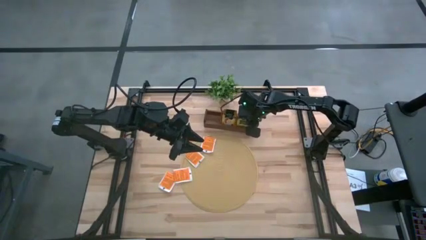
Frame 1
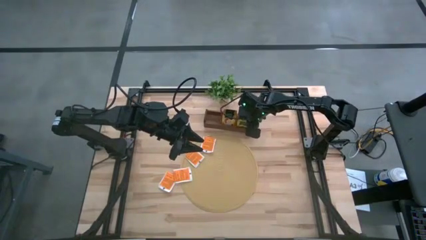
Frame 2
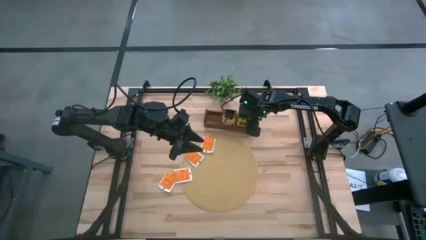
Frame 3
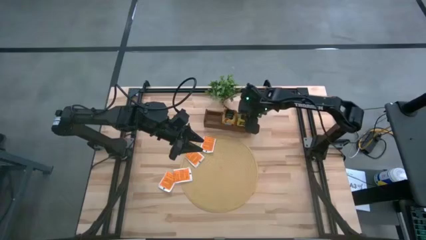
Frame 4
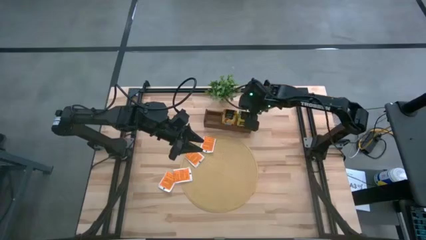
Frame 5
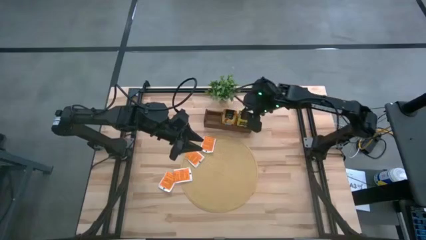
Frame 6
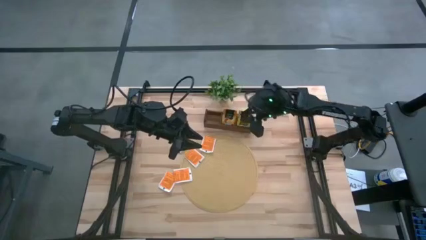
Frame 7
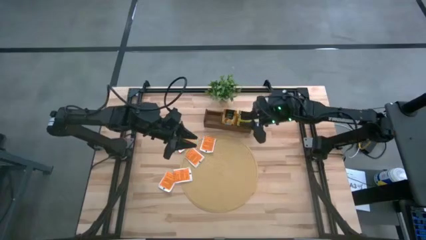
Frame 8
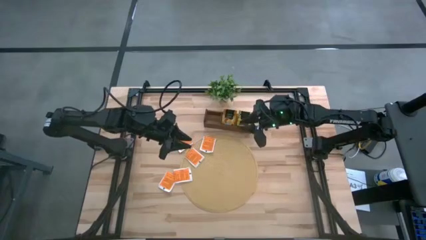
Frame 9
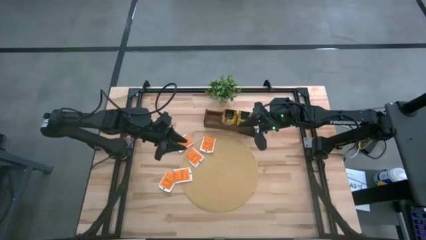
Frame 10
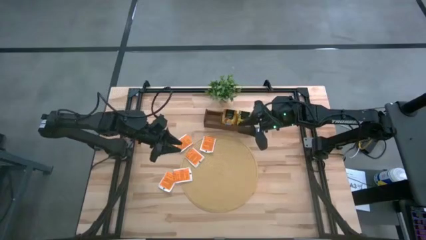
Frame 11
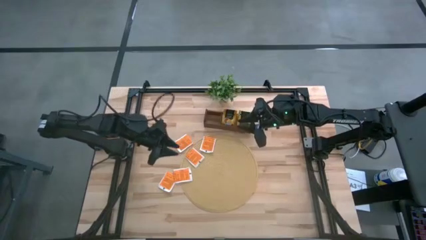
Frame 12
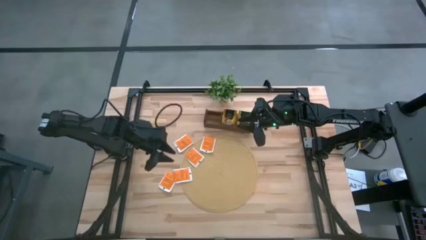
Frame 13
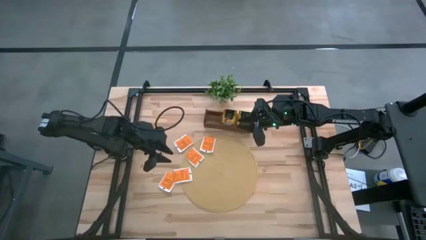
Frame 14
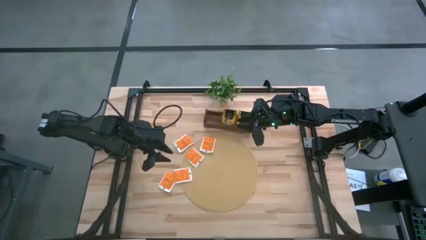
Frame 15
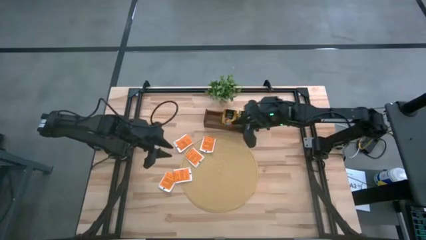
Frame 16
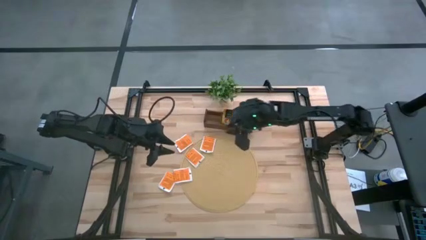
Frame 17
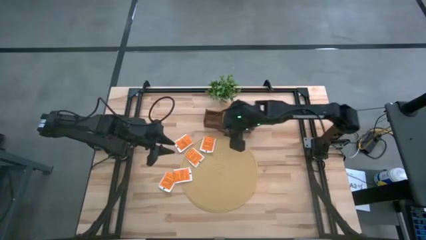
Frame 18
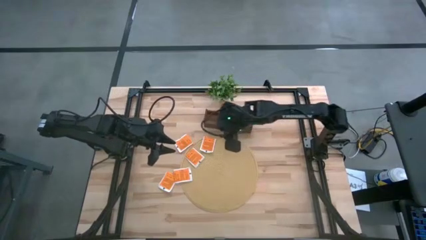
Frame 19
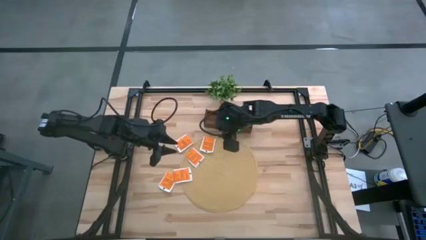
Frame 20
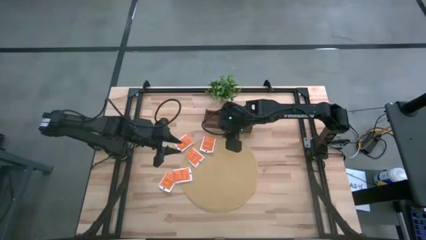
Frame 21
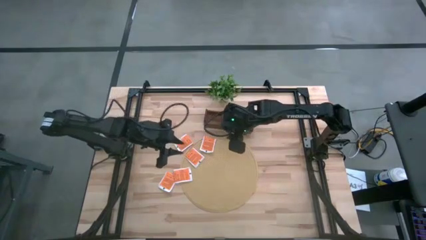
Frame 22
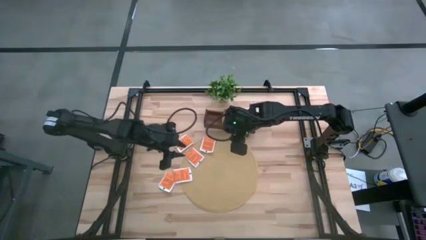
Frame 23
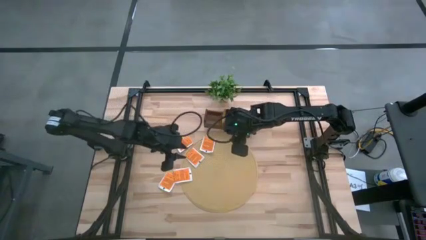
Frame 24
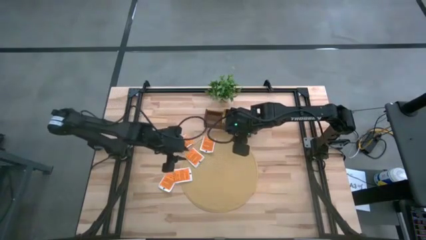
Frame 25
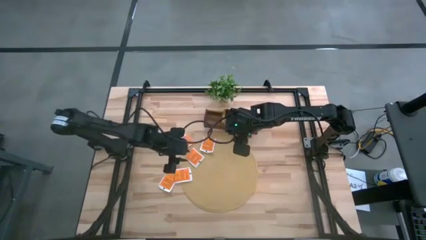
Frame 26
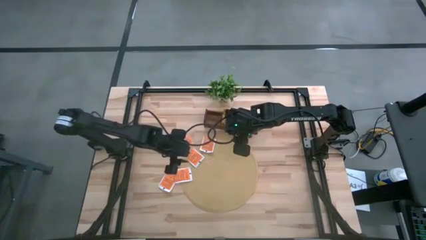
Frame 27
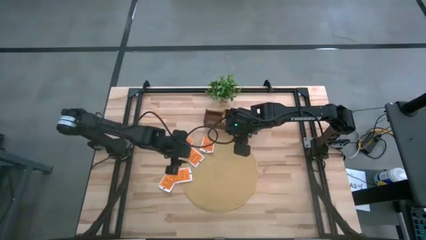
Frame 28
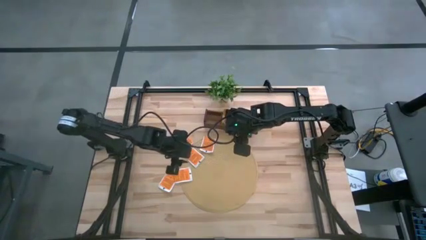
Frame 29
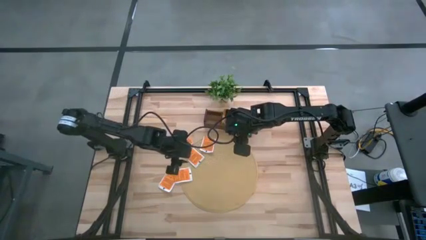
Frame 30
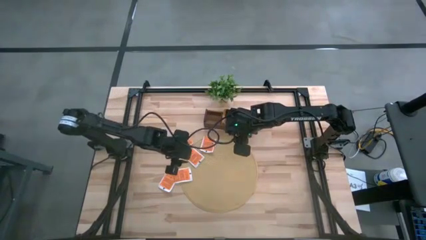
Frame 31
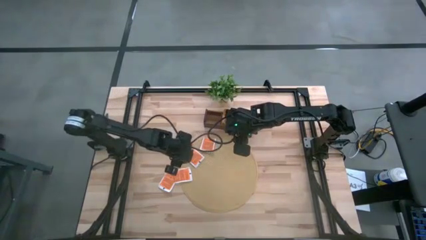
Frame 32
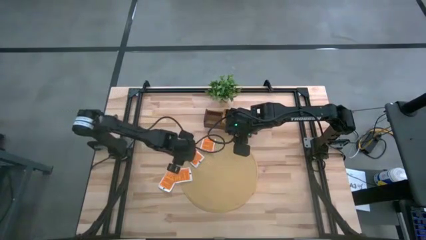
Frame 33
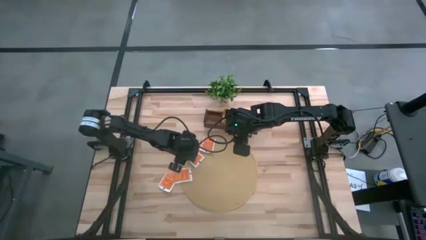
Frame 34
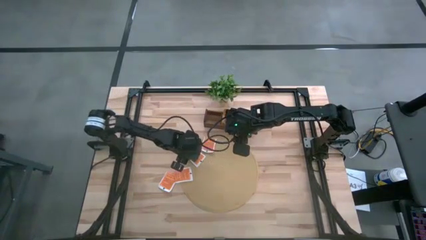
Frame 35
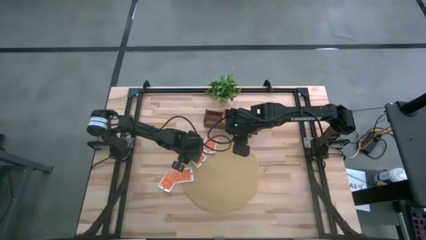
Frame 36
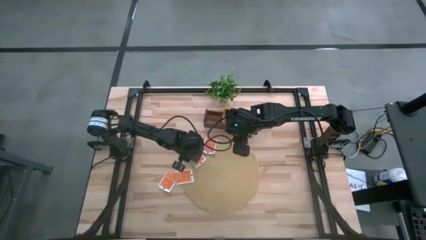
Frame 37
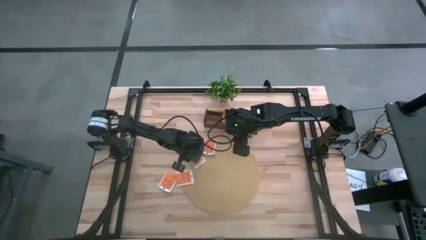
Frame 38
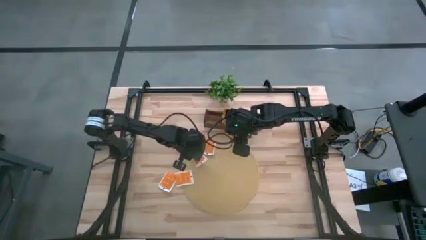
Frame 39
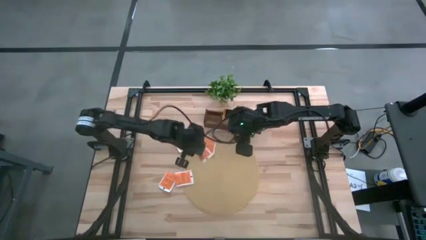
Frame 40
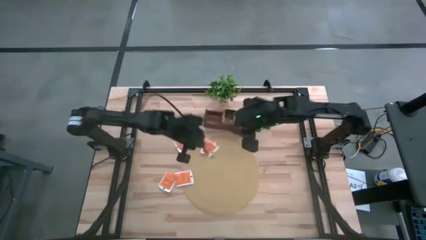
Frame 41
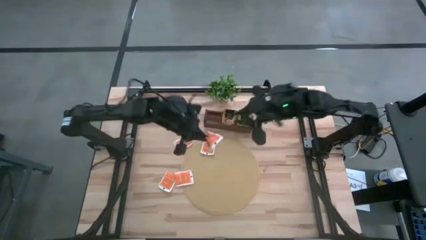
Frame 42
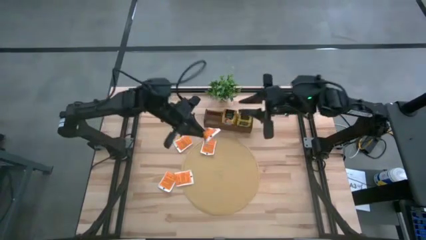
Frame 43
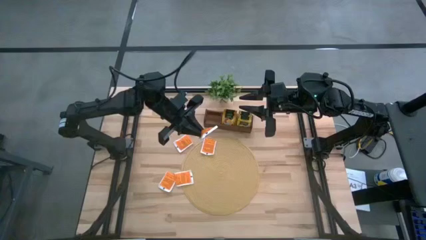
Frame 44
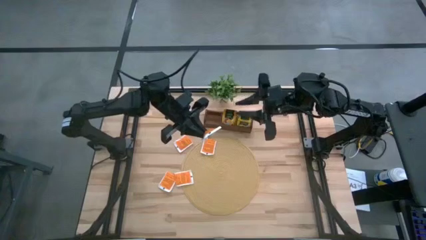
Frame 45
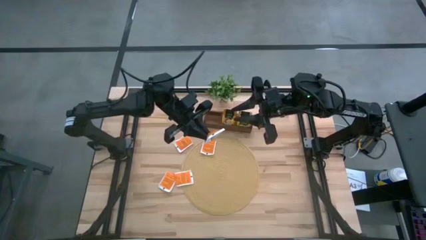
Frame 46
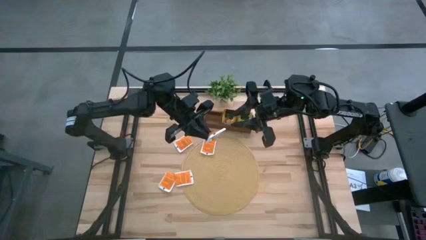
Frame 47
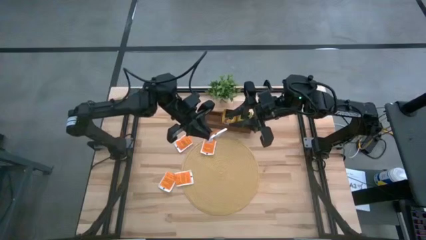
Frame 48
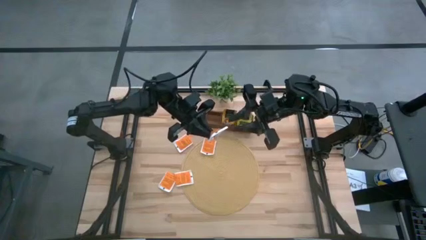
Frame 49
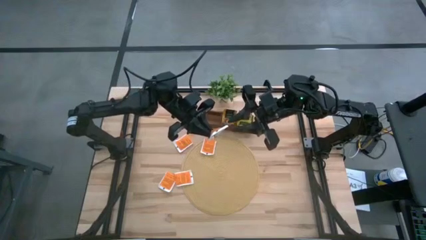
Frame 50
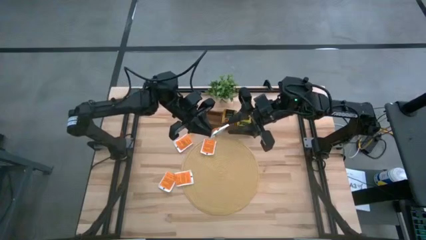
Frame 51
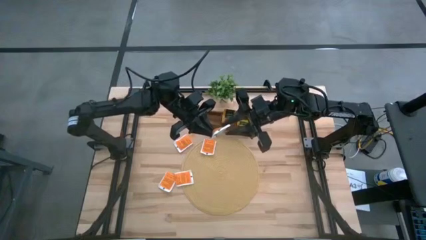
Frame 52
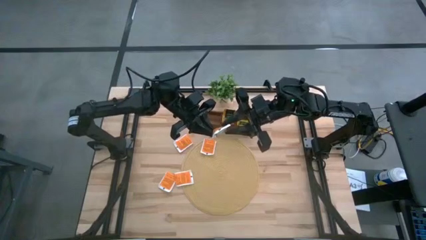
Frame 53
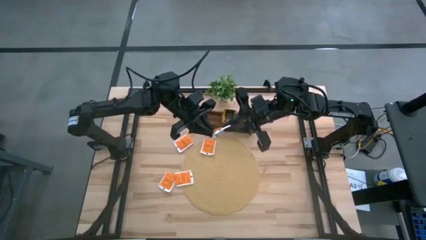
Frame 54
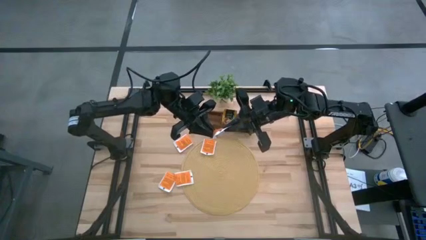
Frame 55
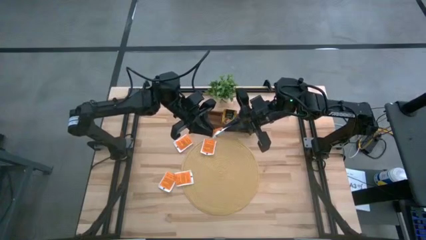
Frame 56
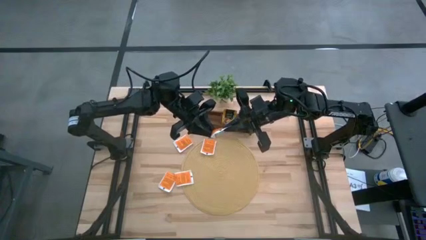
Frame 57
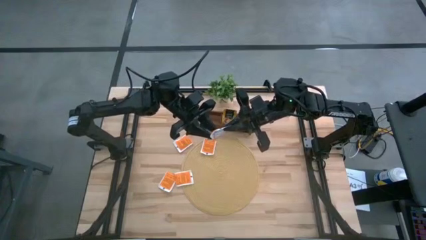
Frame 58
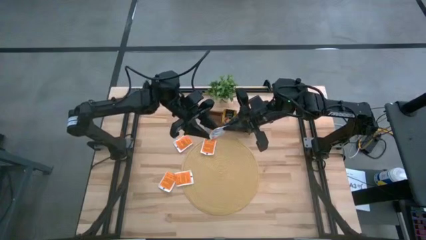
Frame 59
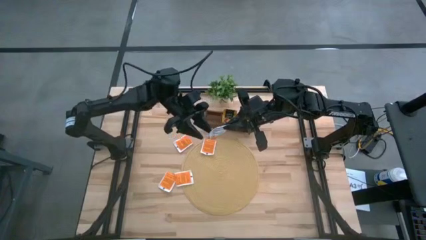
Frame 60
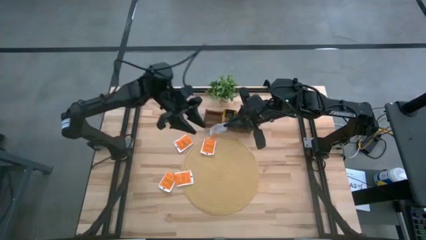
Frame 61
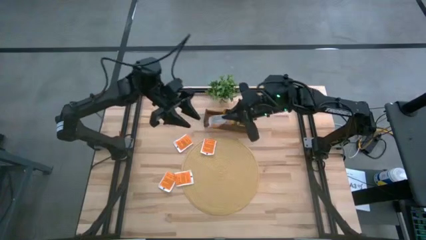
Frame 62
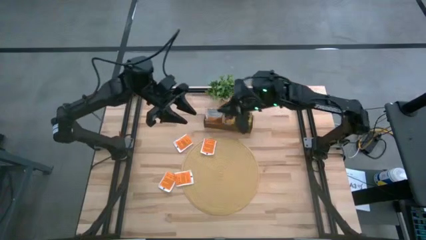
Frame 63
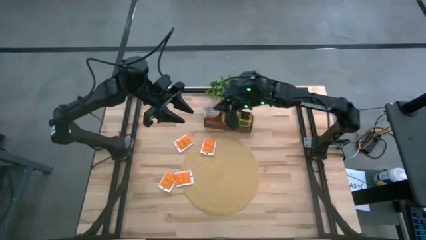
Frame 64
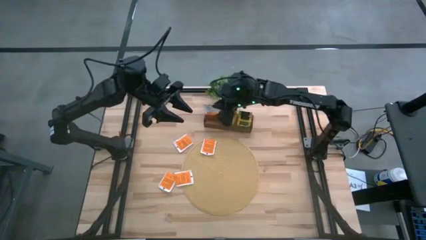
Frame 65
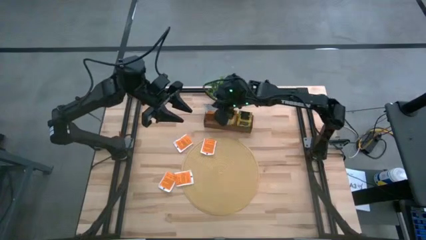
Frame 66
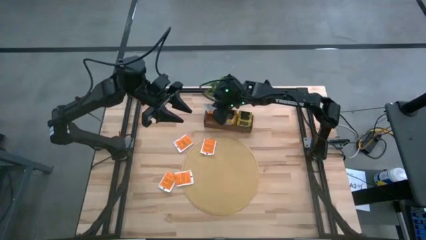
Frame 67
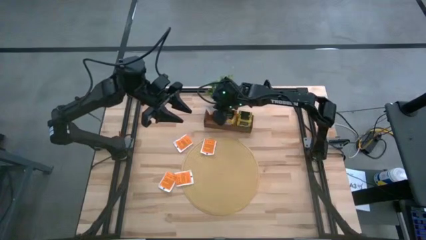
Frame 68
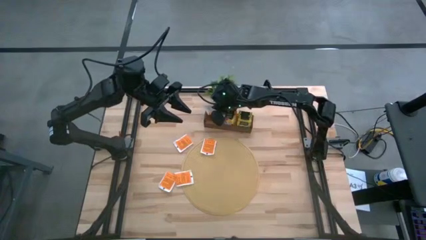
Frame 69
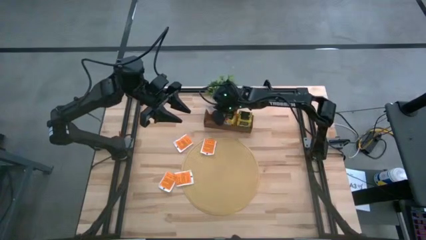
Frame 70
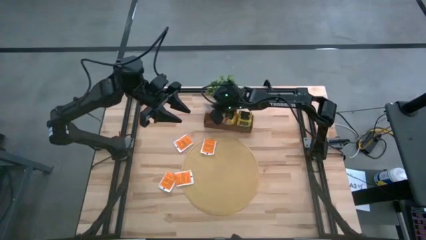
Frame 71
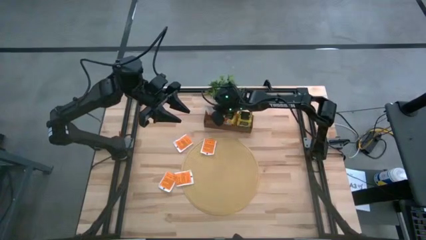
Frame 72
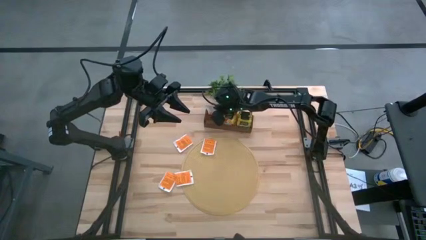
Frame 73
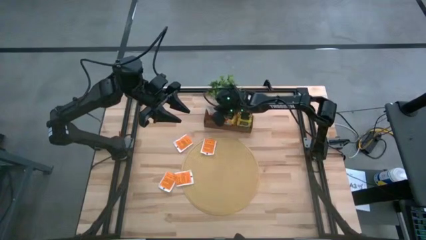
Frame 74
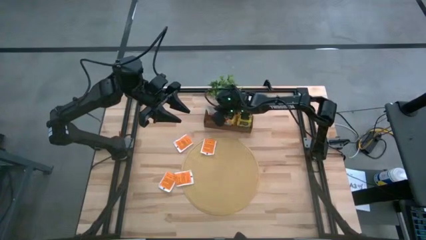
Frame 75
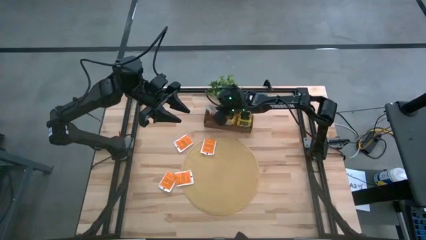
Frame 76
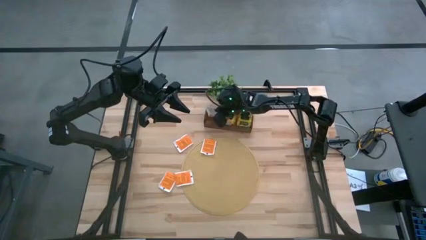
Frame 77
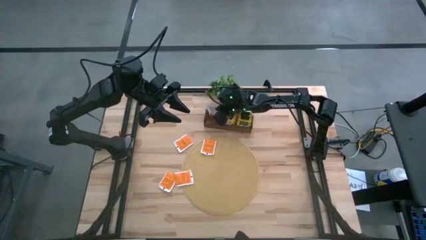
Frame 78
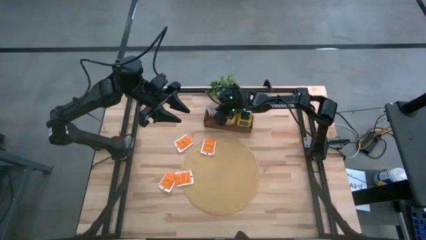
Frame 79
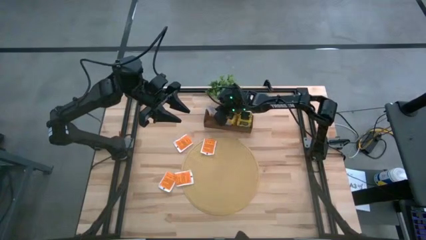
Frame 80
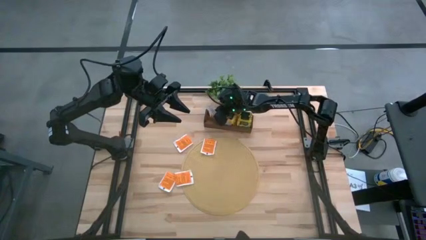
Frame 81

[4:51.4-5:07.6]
Task: Pick & Place Tea
Put the white tea bag into the left section of the wooden organizer

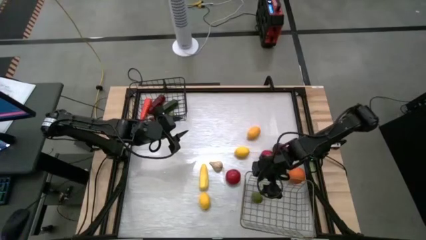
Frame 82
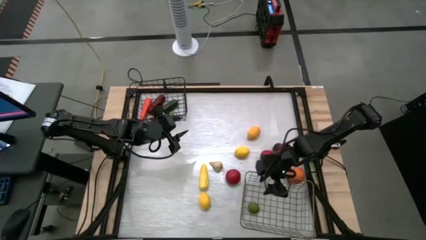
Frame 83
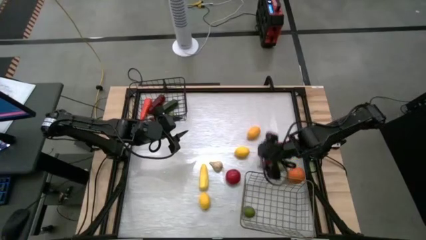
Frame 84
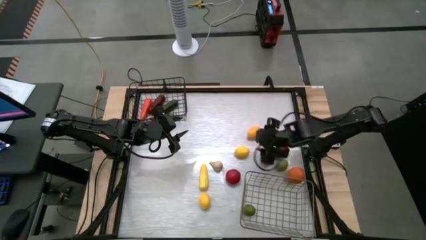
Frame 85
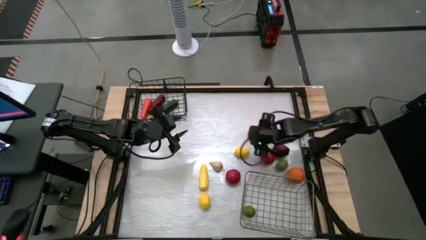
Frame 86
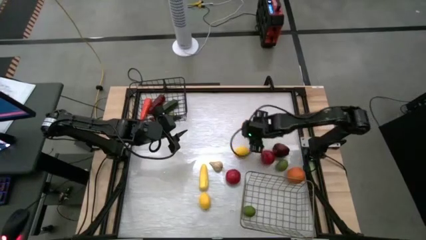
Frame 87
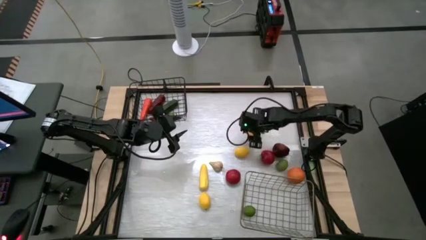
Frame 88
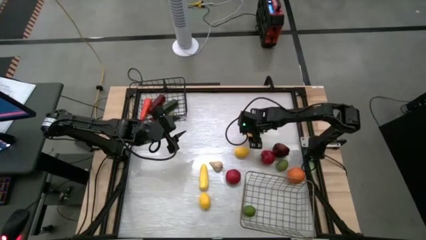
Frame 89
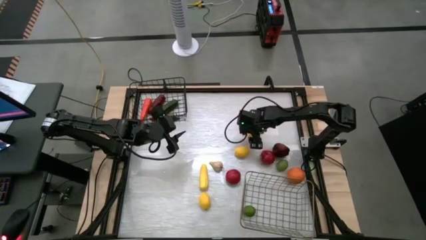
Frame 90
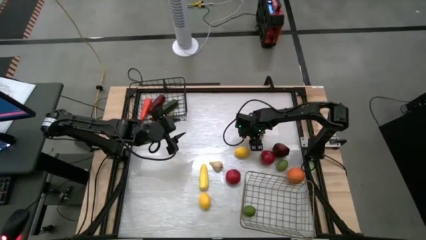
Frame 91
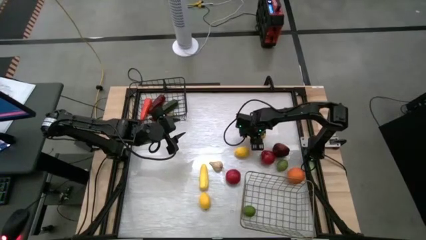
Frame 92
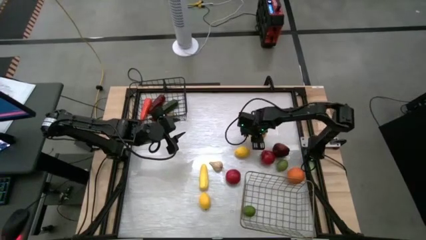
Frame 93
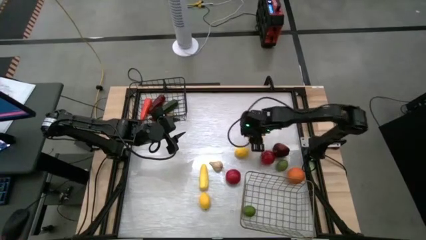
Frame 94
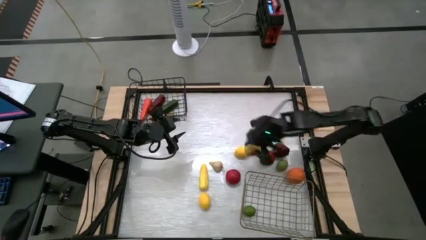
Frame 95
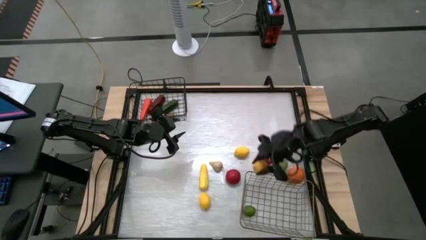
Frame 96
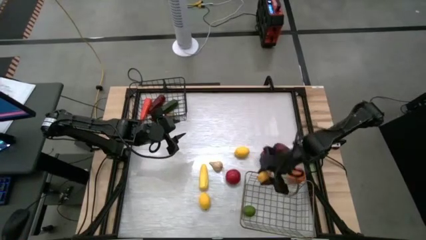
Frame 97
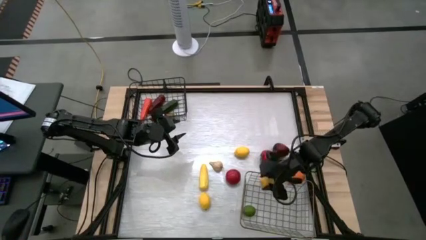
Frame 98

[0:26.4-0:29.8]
Task: Sort produce into baskets
Put the top lemon into the gold wire basket
